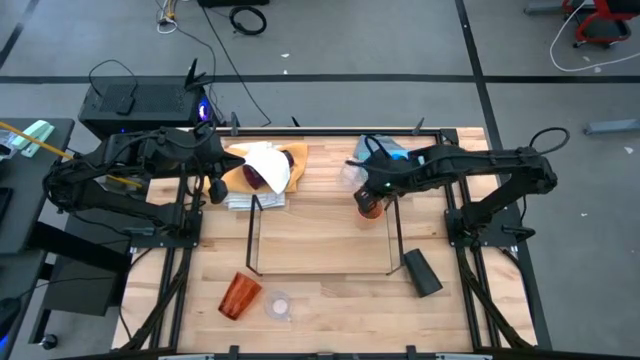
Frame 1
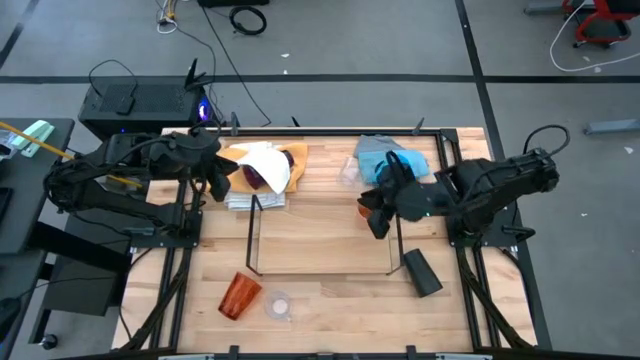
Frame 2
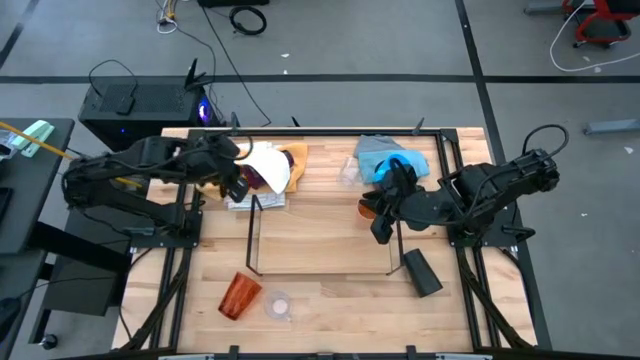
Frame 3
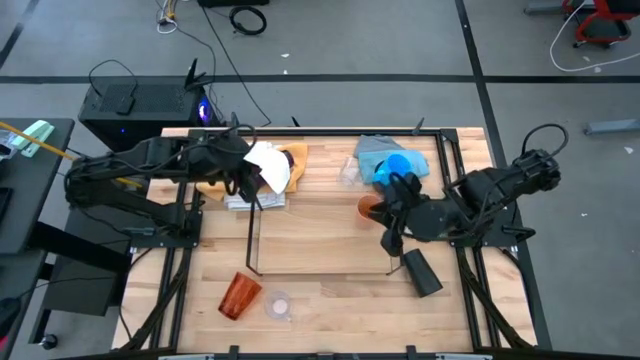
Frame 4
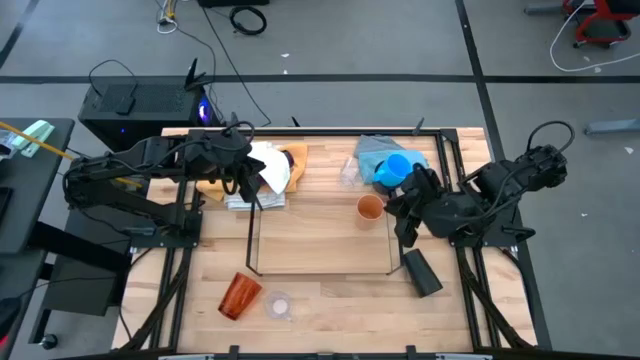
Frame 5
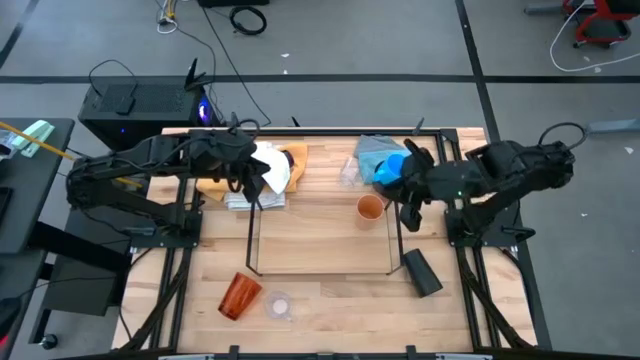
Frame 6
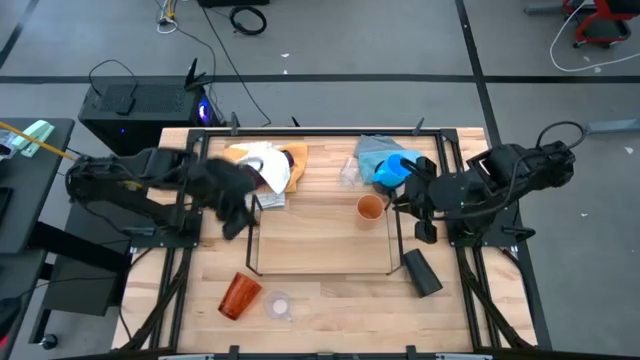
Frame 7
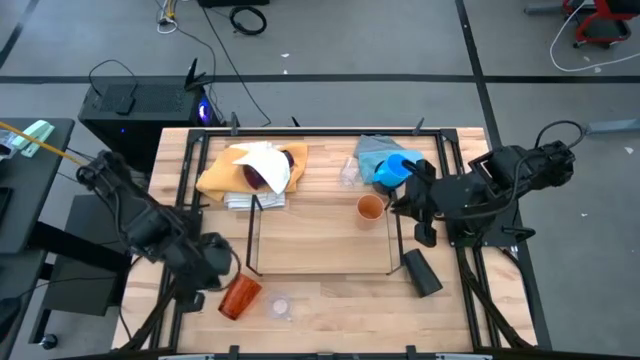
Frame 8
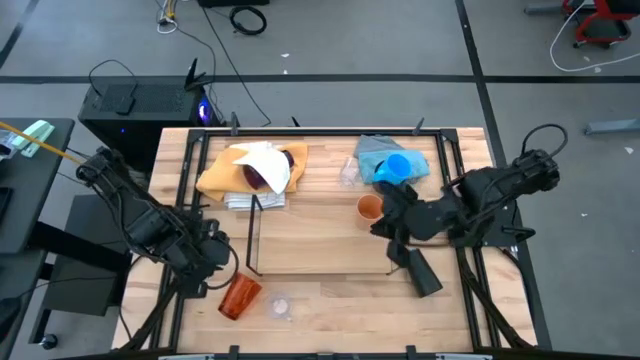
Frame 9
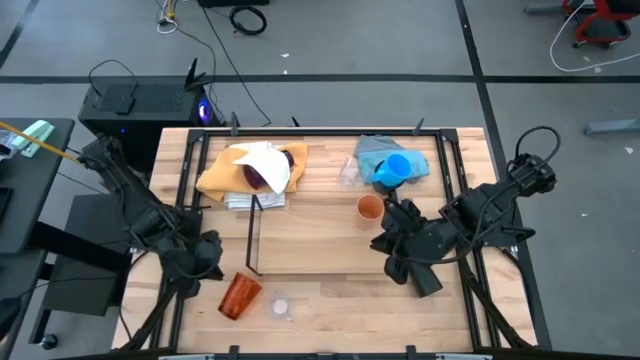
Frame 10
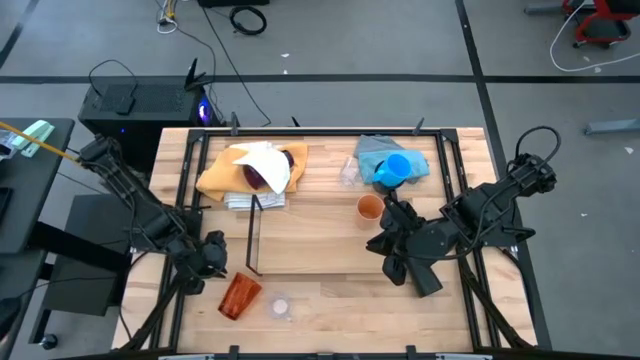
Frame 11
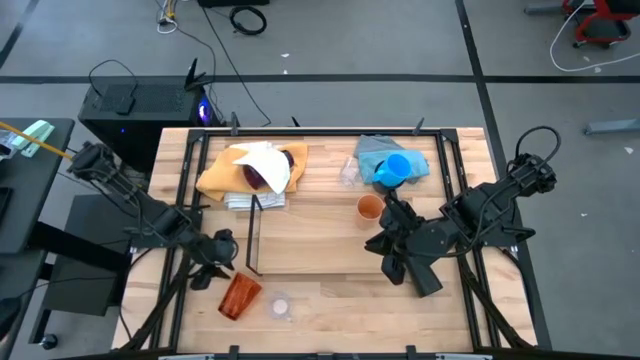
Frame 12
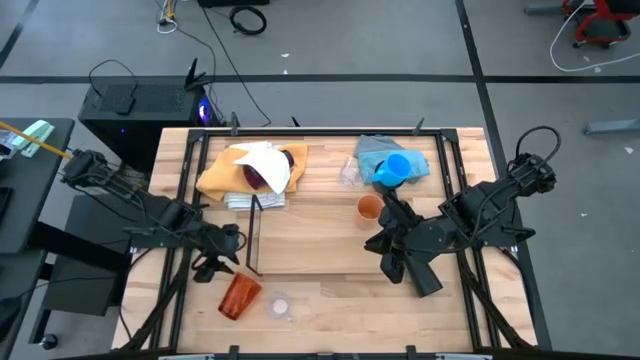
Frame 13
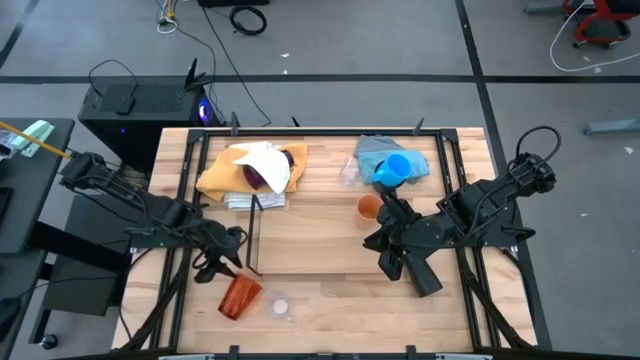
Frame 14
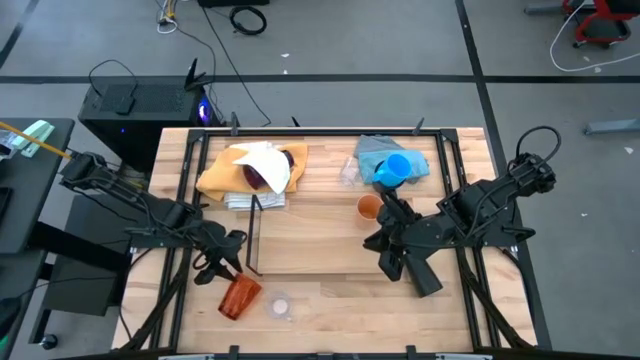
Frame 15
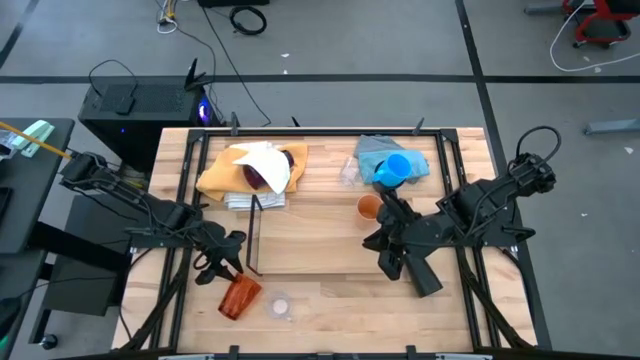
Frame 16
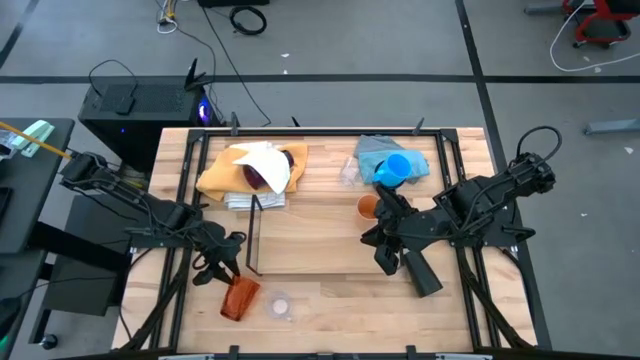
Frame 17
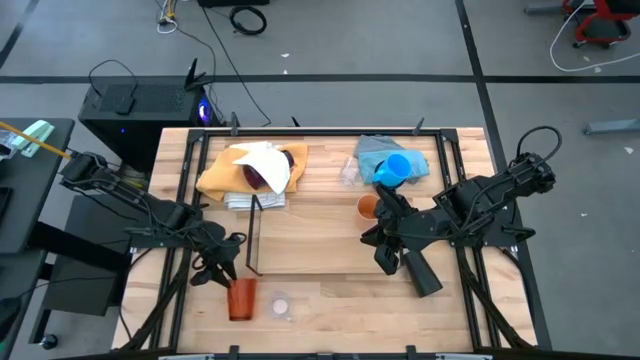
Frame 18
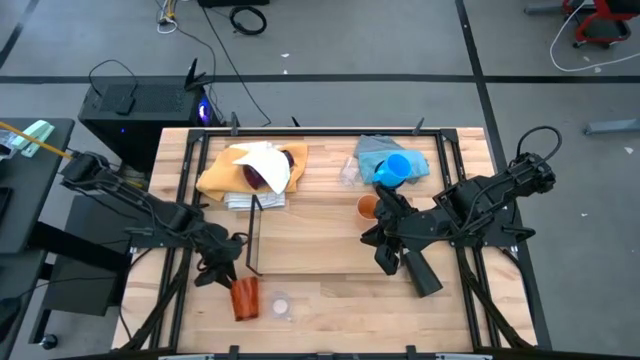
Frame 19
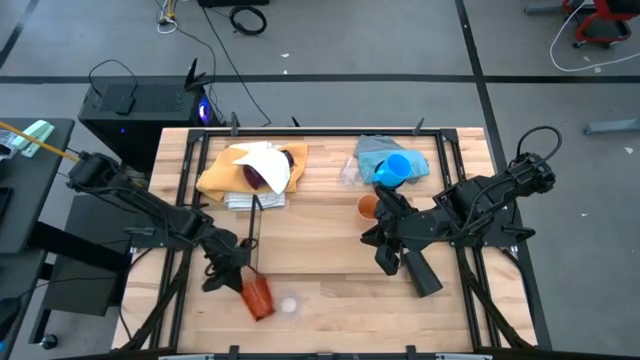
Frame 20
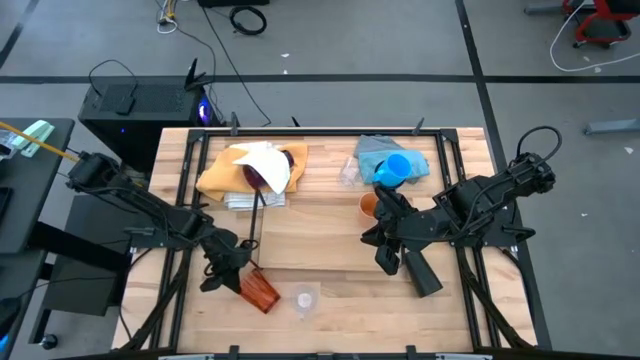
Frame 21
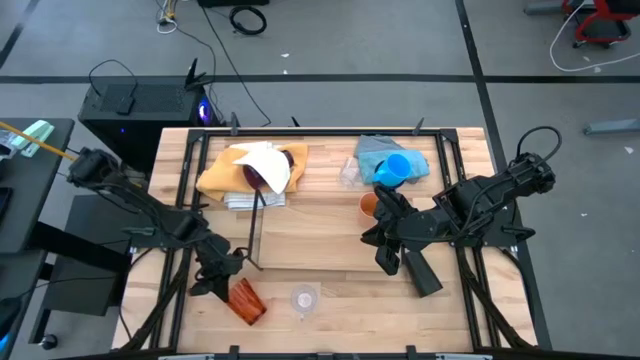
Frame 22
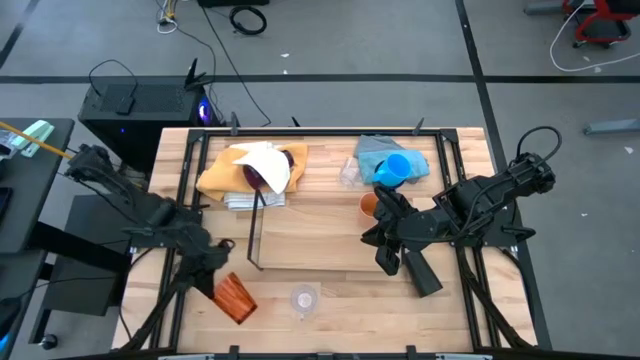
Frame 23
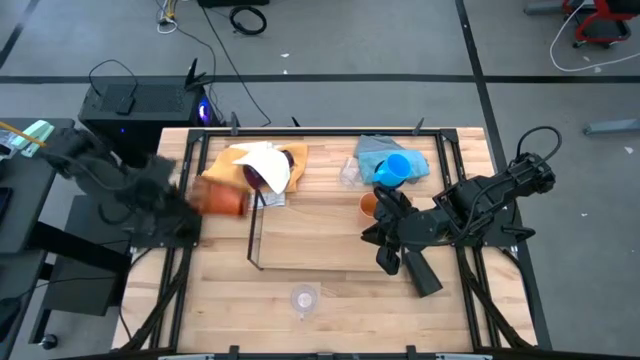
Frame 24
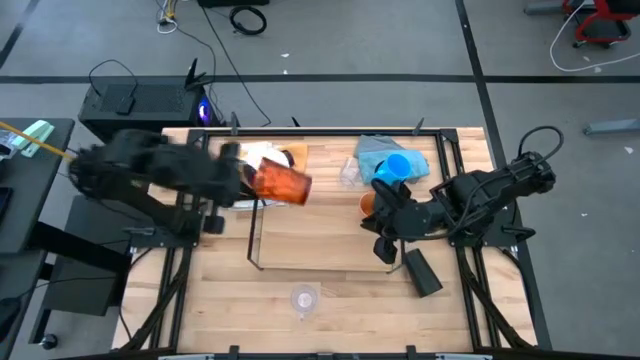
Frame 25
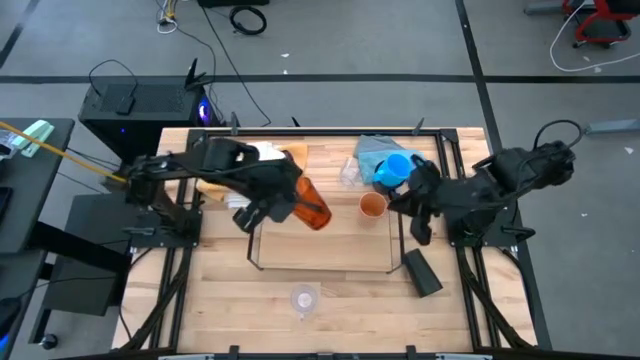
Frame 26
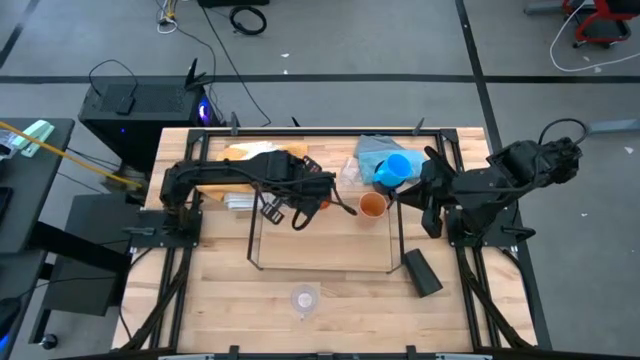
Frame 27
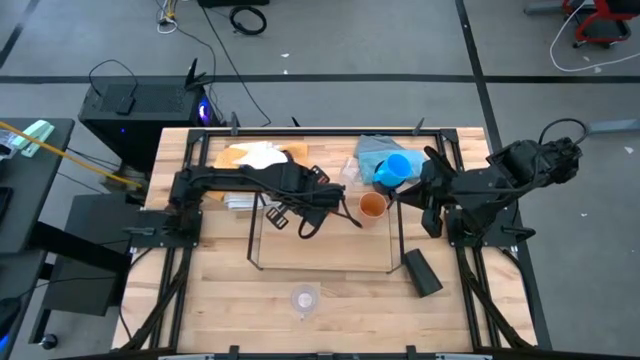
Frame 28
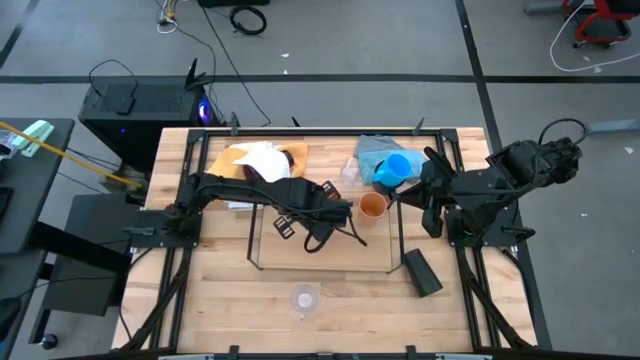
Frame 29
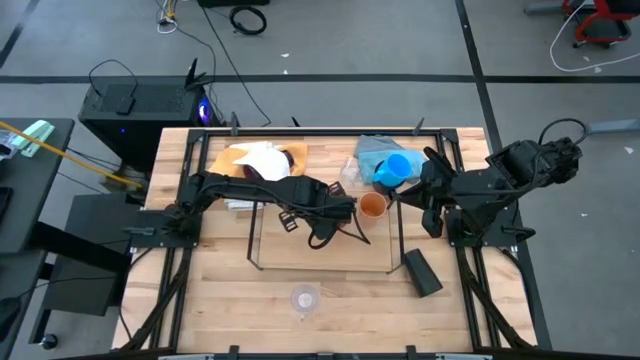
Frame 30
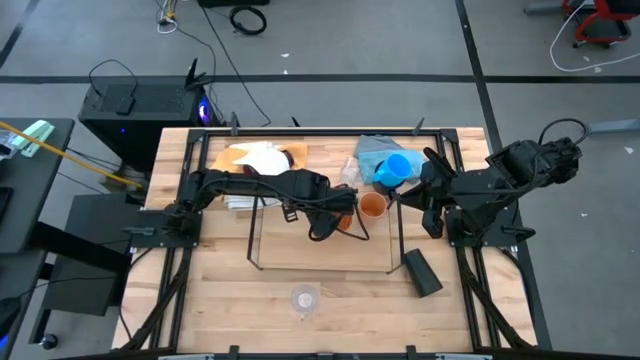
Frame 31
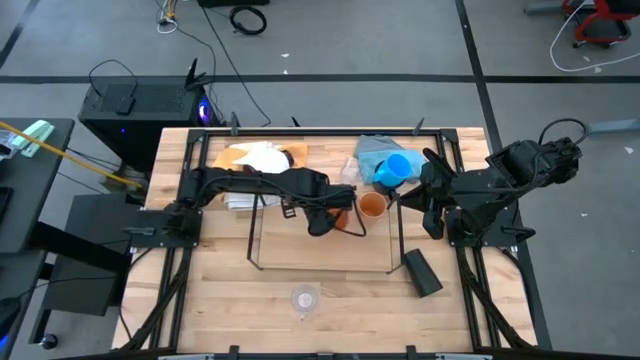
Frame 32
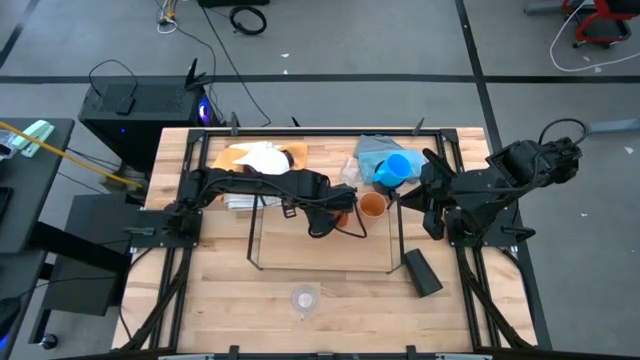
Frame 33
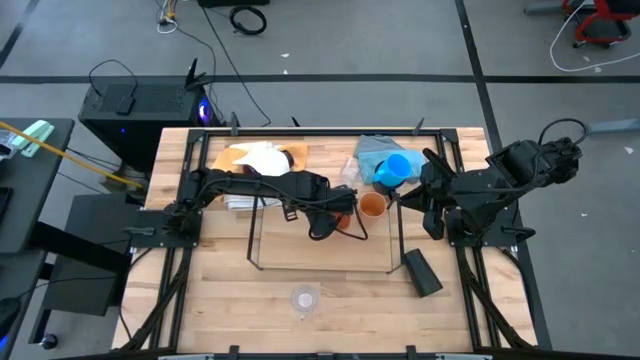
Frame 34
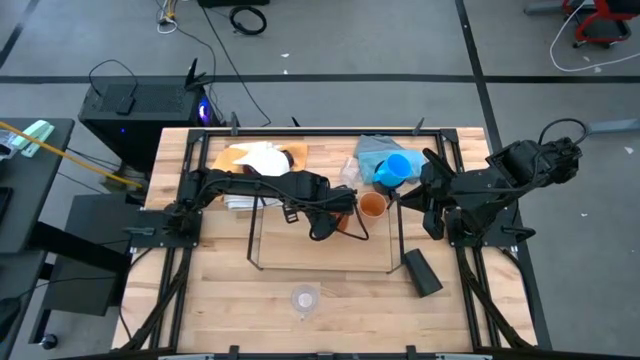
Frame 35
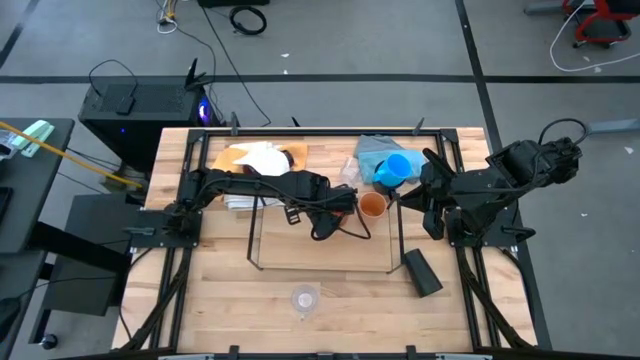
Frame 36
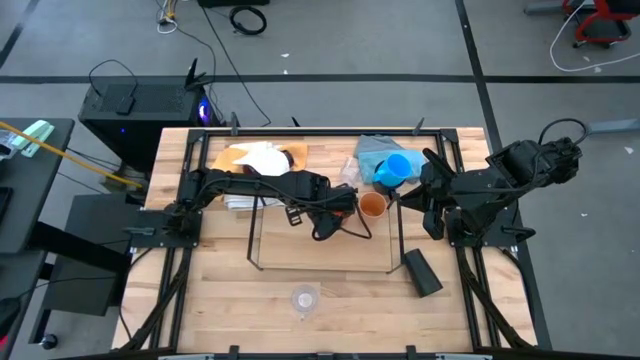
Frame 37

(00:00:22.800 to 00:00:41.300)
Task: Stack small to large cups/mugs on shelf
Put the orange cup on the shelf

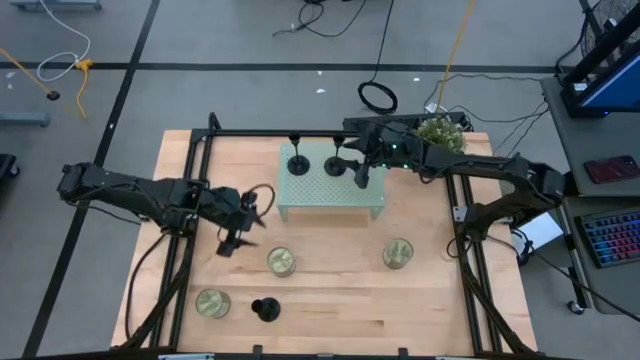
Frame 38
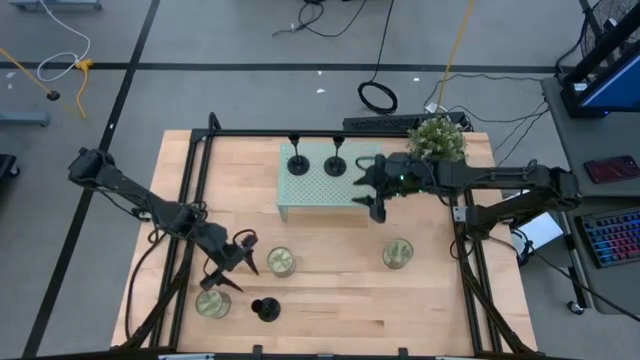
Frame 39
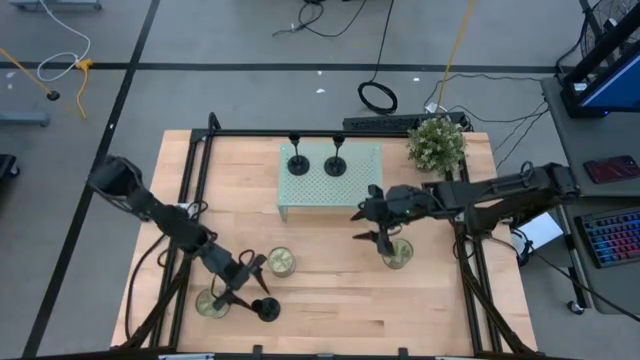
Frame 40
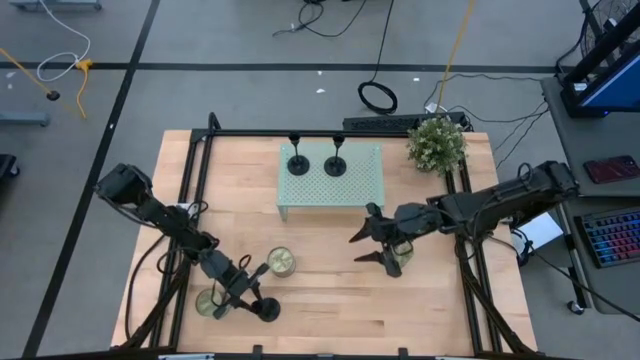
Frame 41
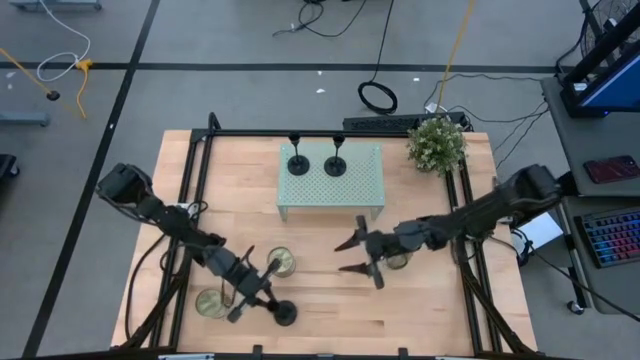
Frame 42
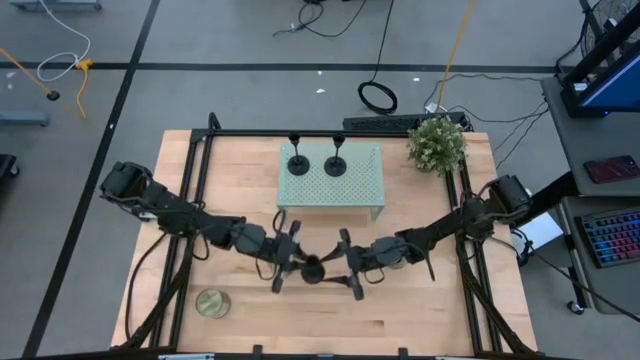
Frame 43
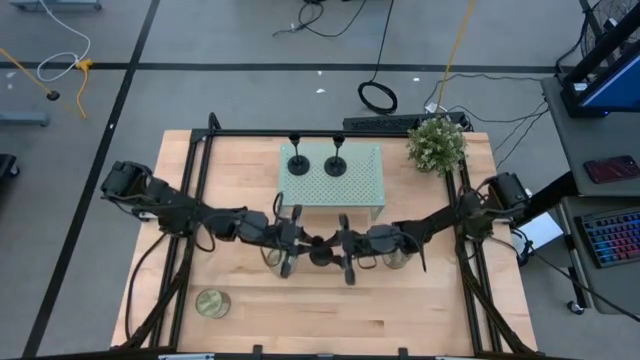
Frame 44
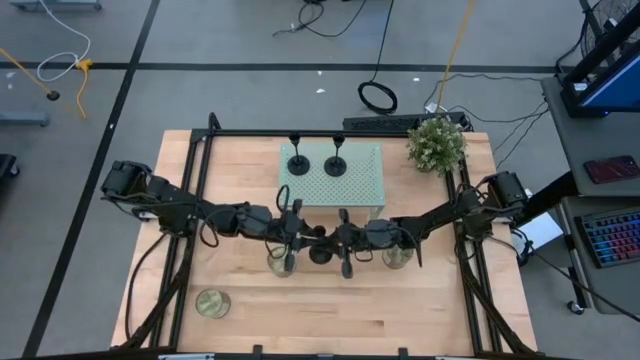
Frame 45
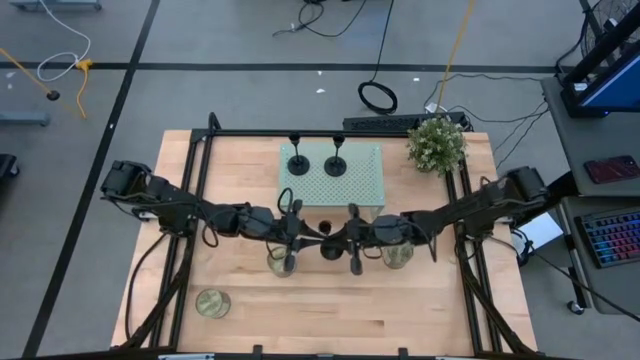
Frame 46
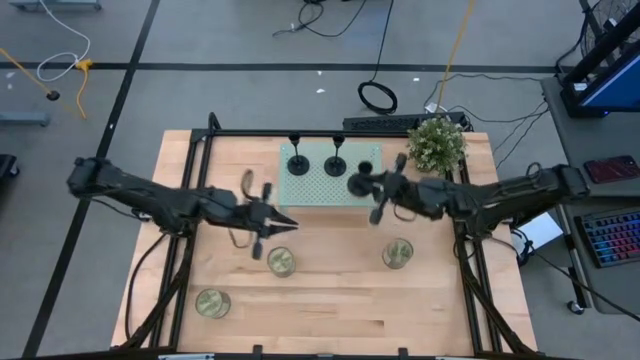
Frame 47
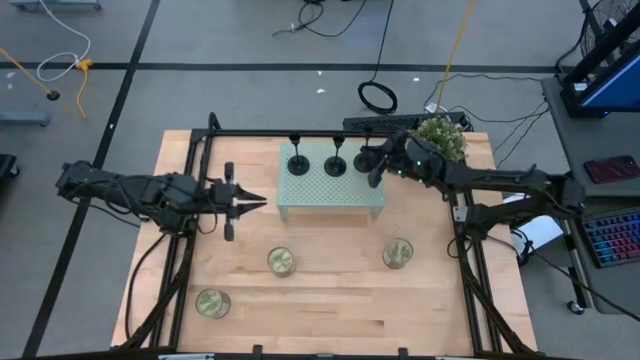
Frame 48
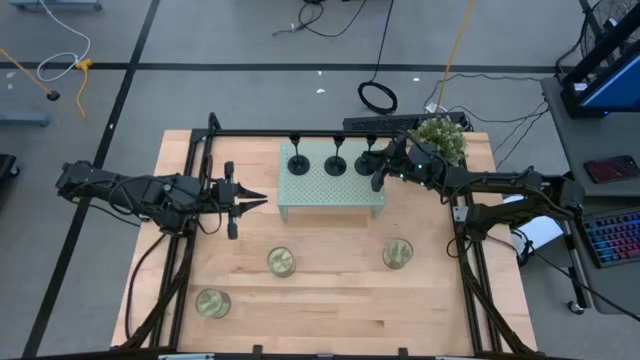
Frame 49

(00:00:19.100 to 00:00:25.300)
Task: Stock candles and holders on shelf
Align the black candle holder on the shelf with the other black candle holders
